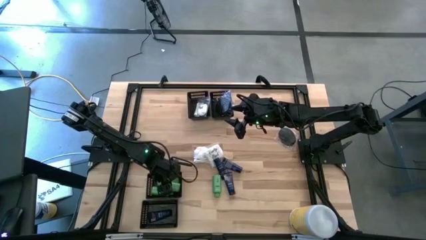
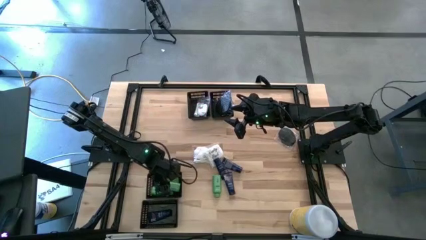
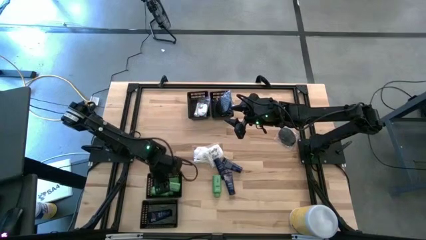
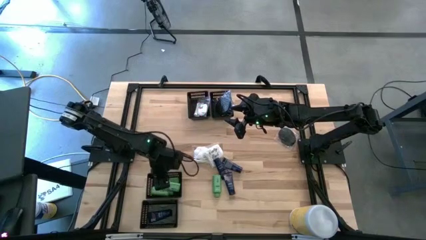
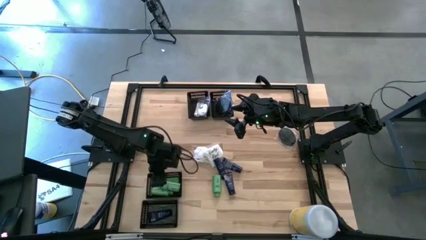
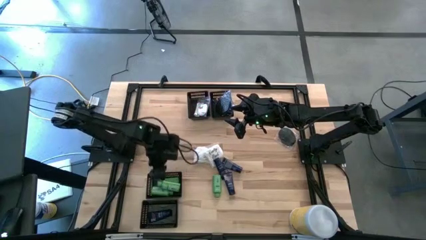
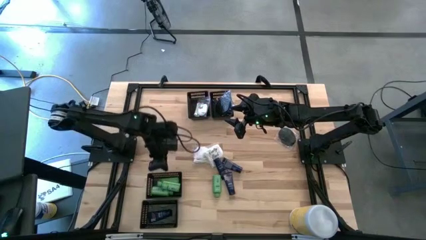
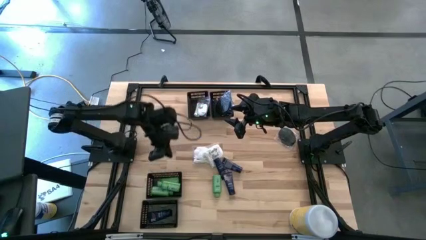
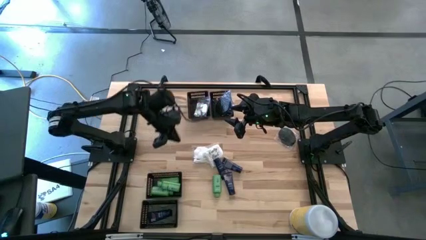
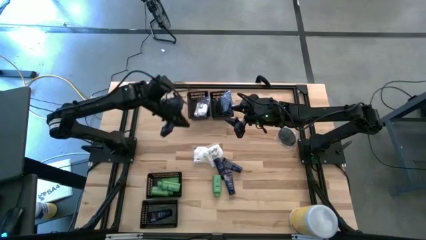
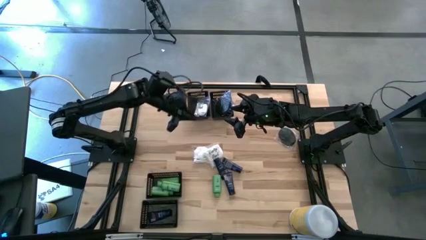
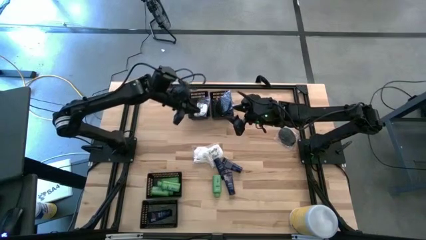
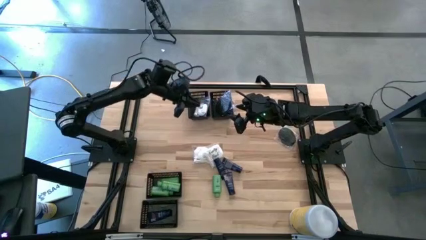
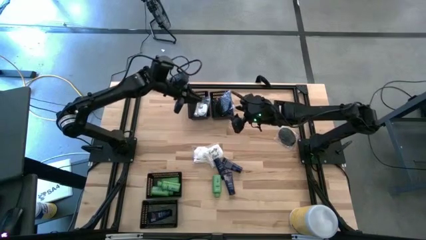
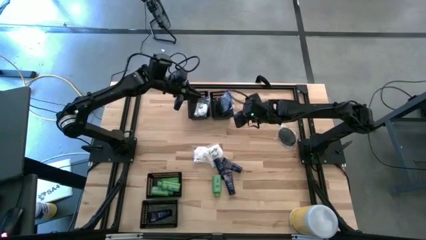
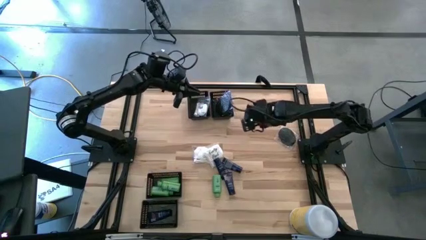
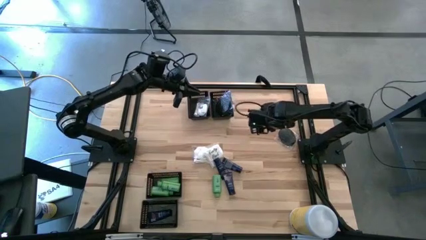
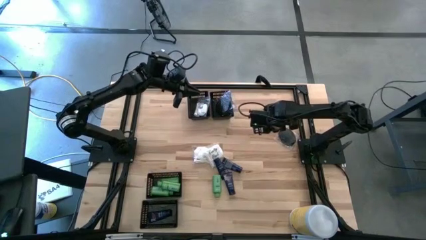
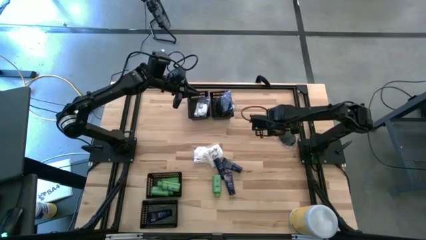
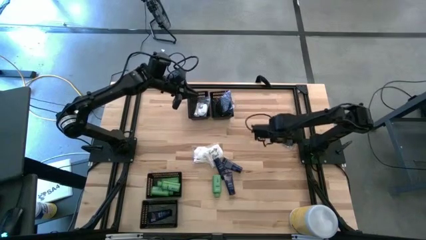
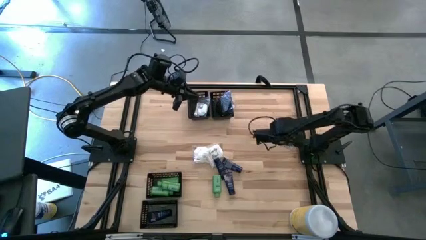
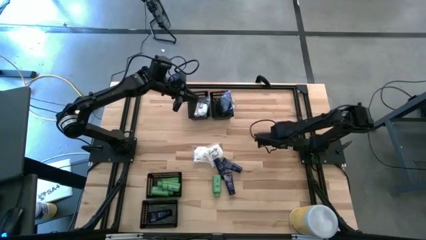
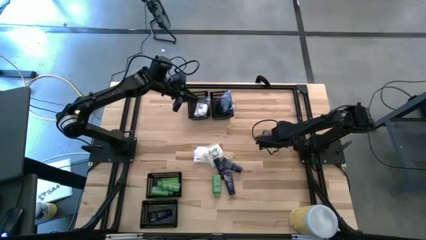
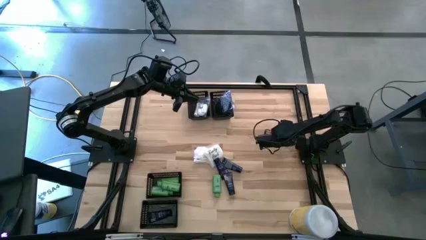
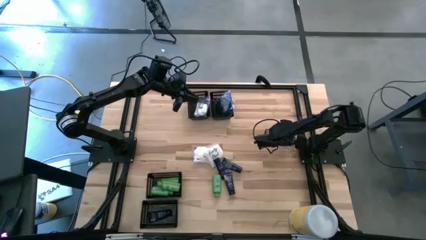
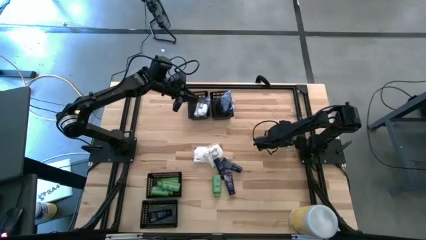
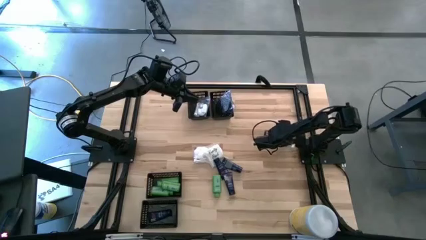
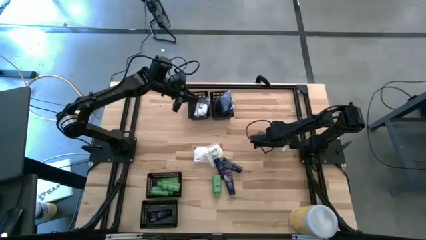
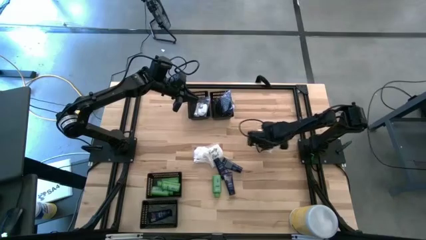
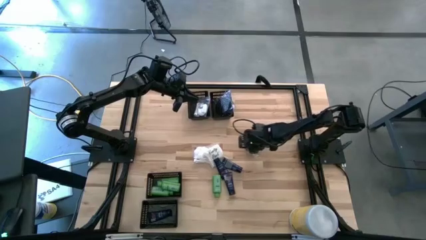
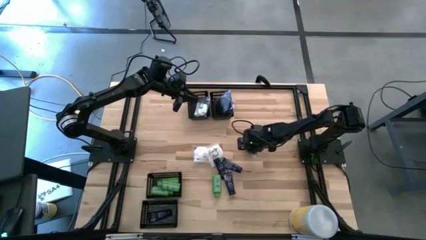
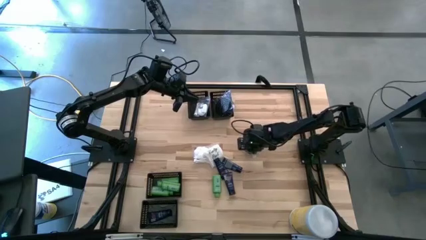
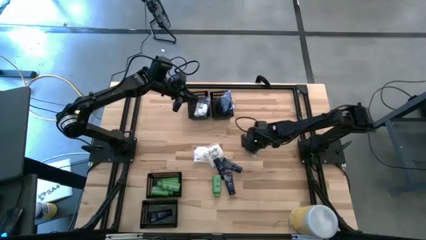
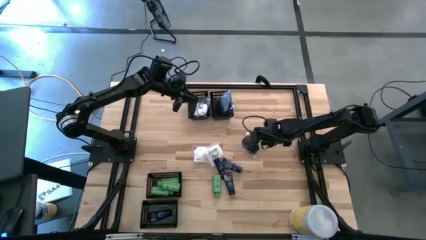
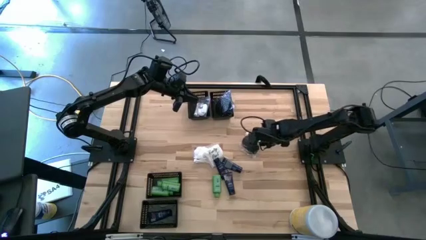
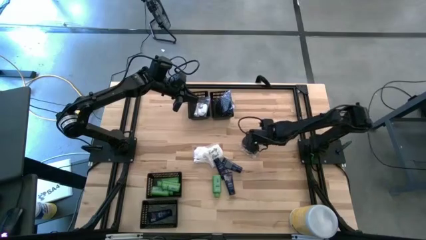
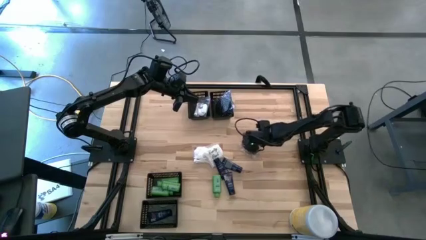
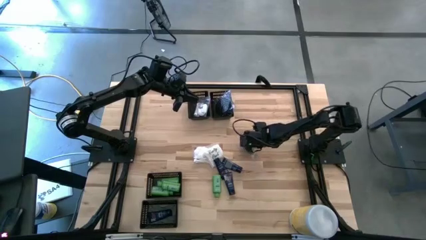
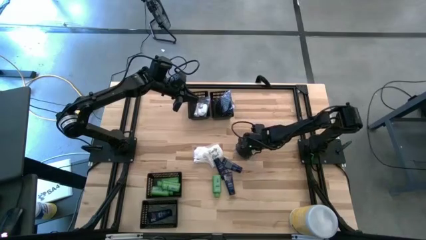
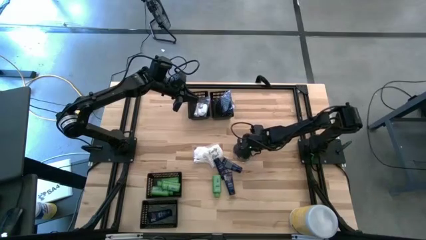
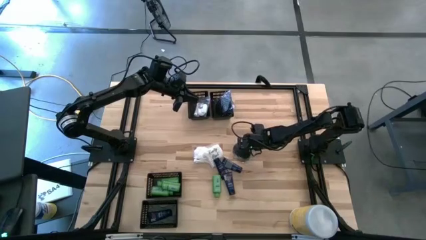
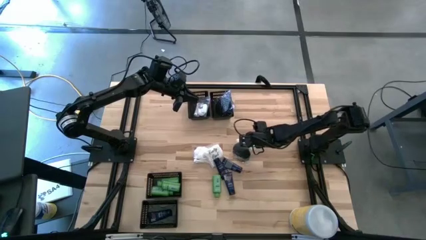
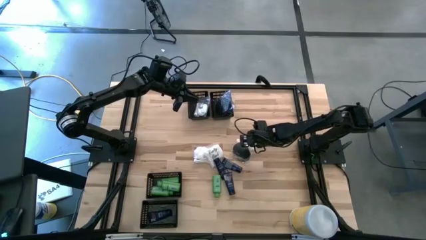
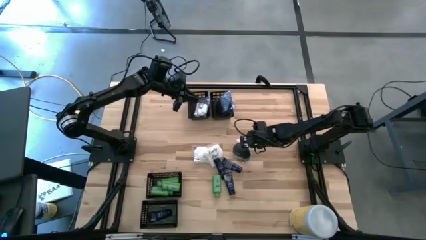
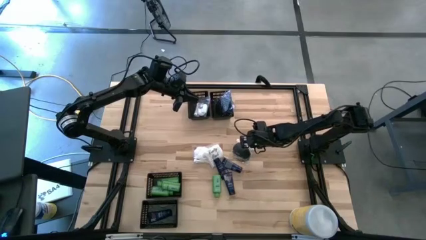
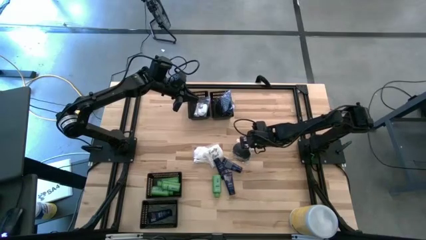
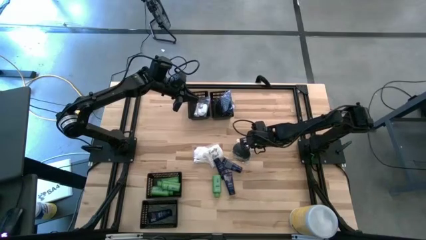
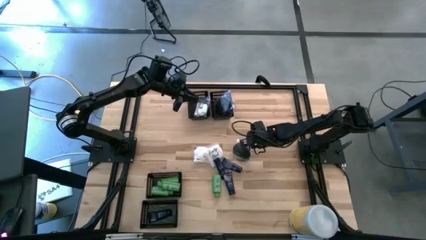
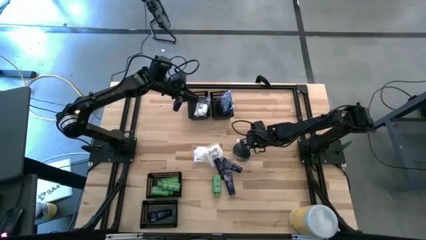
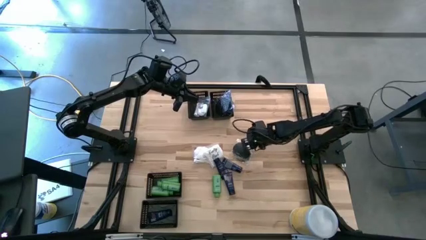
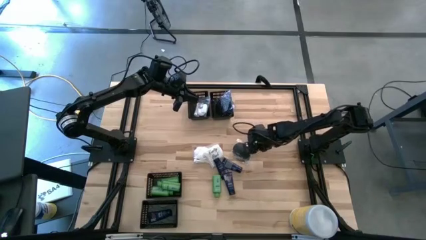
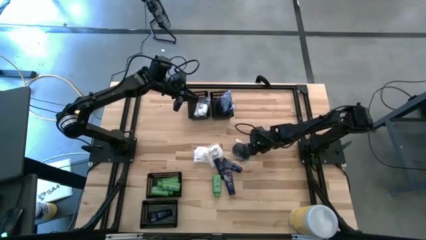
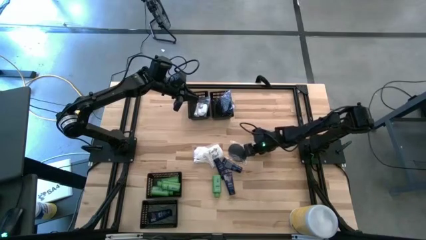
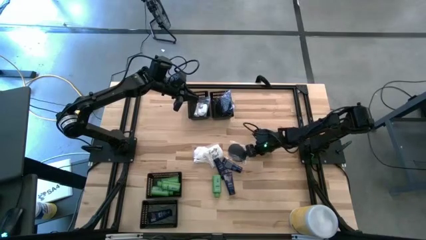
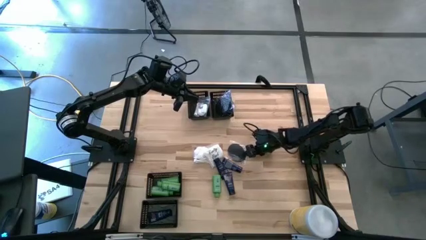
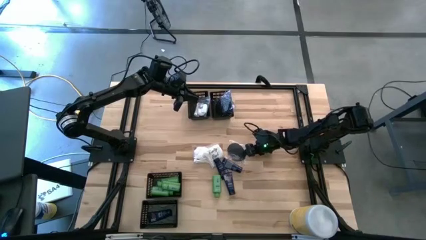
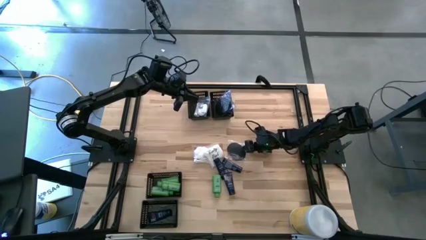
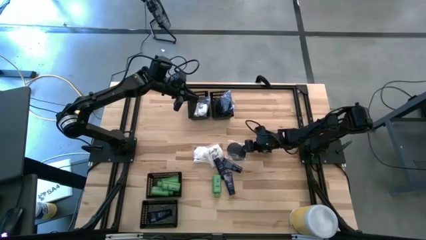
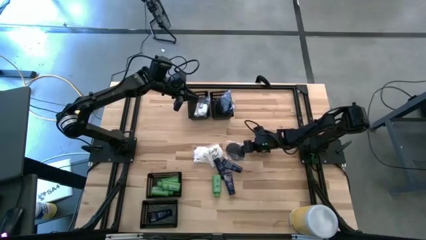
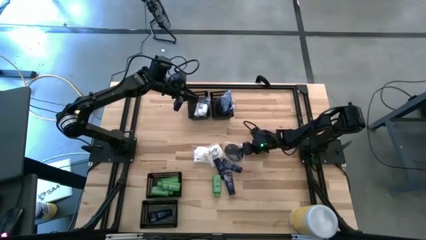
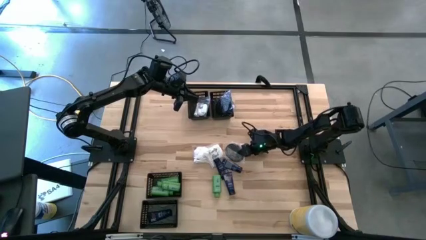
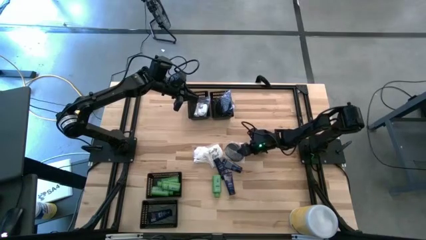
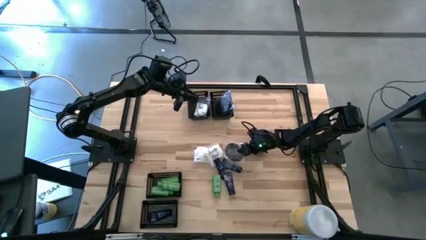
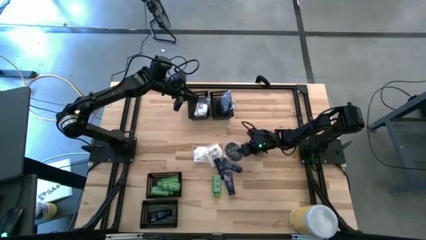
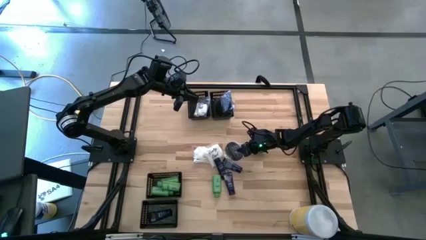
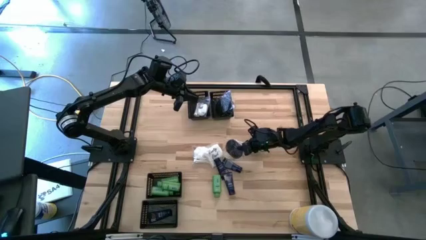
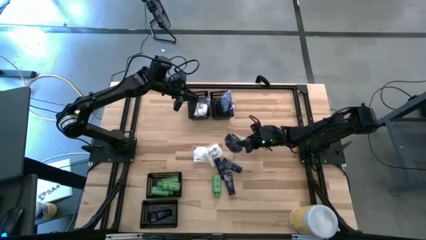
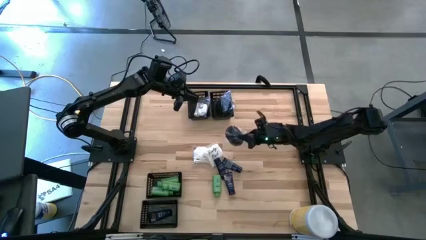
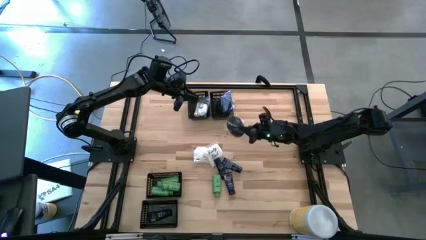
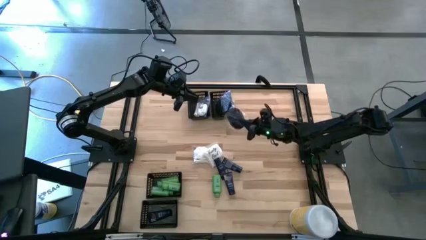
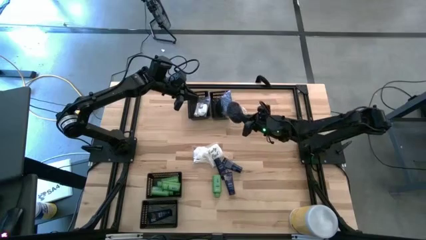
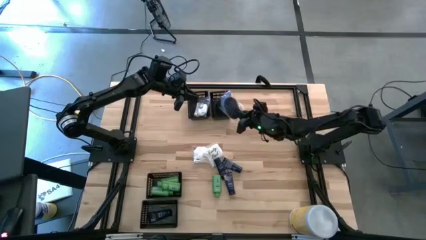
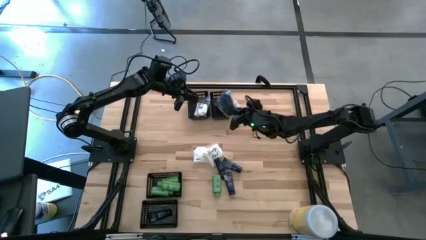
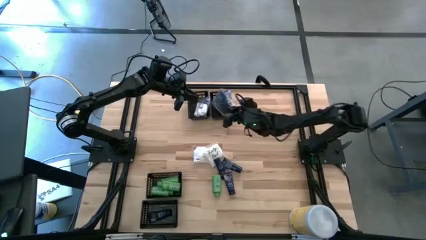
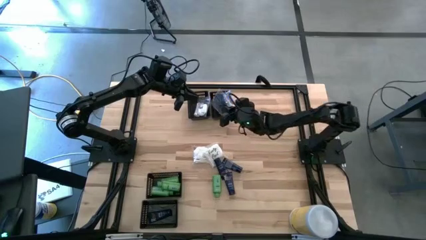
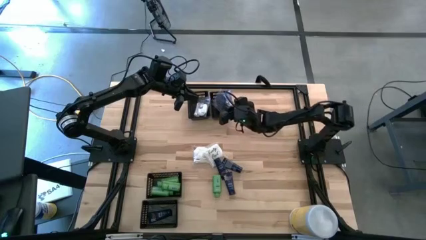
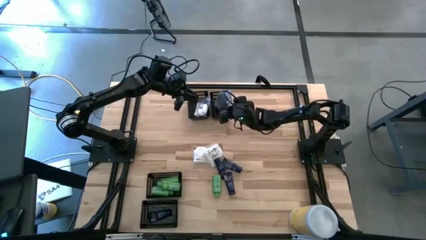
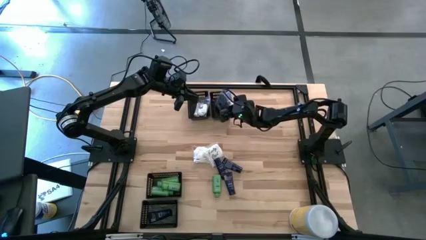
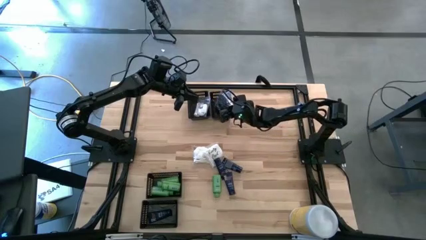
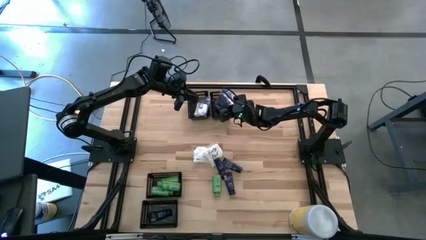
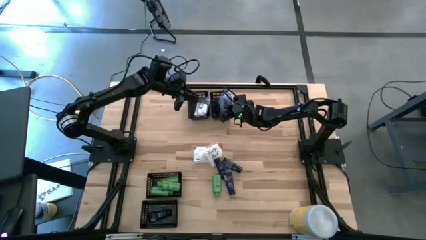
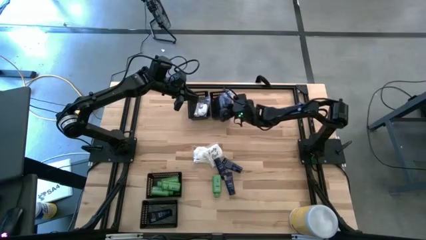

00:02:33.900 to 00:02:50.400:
Task: Pick & Place Travel size toiletries
Put the black hairbrush into the top right basket
